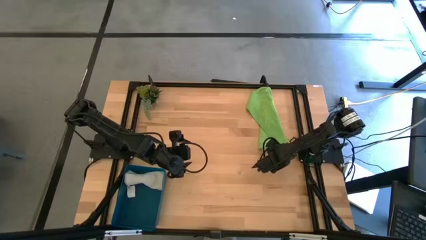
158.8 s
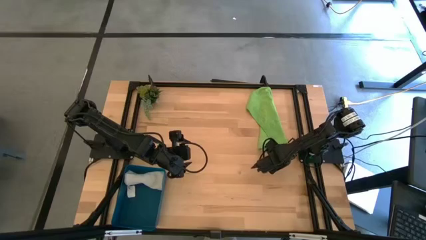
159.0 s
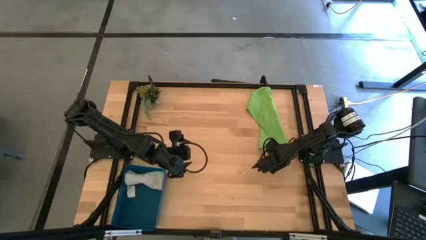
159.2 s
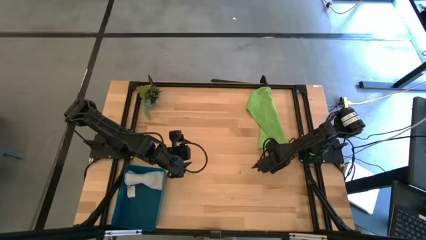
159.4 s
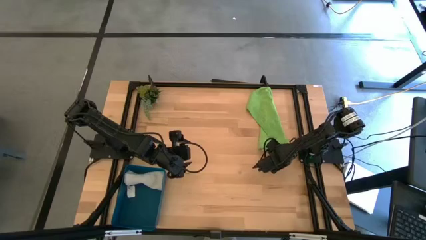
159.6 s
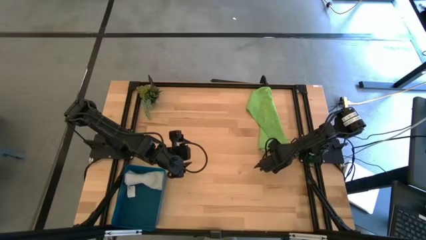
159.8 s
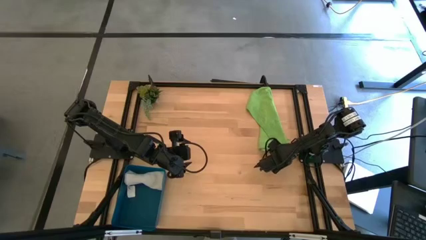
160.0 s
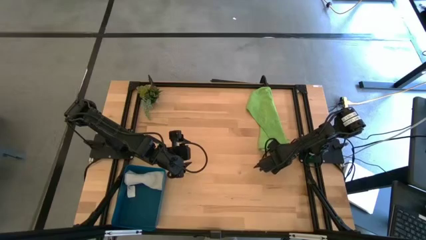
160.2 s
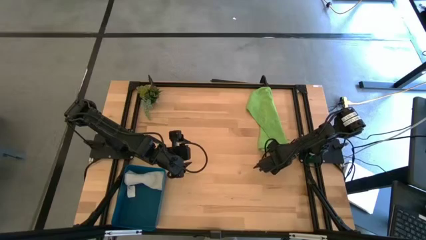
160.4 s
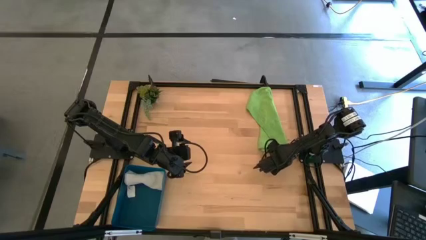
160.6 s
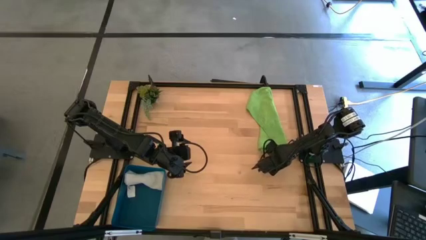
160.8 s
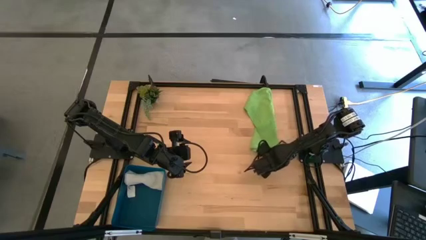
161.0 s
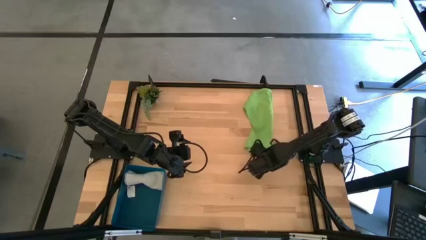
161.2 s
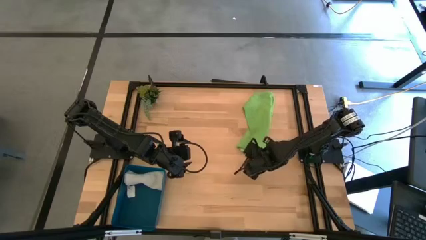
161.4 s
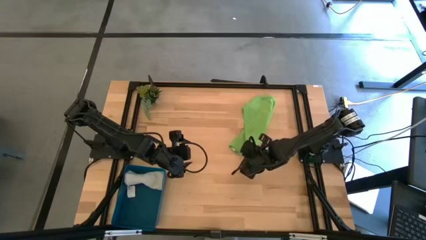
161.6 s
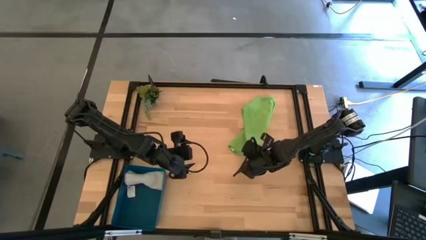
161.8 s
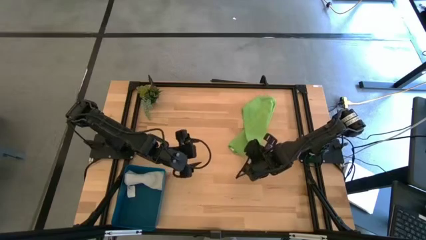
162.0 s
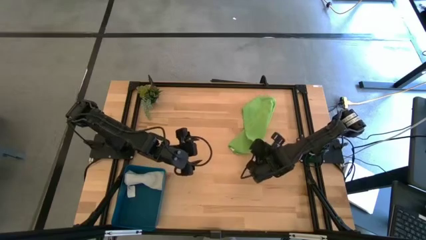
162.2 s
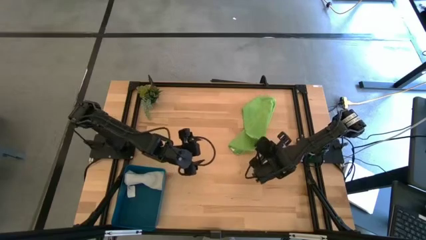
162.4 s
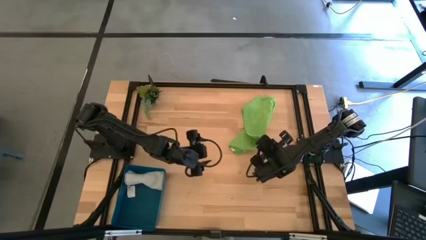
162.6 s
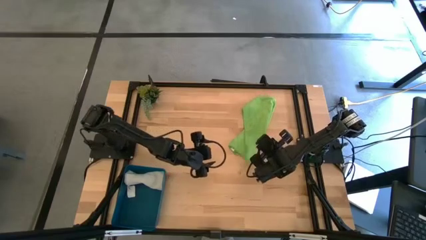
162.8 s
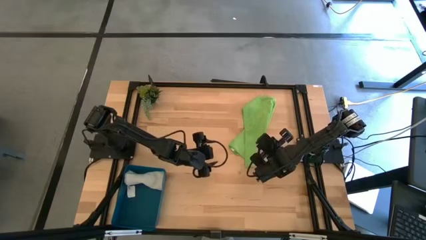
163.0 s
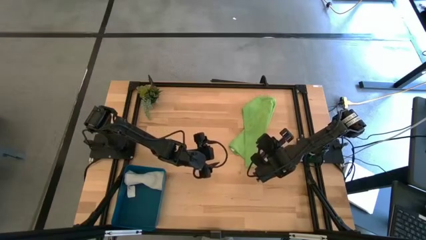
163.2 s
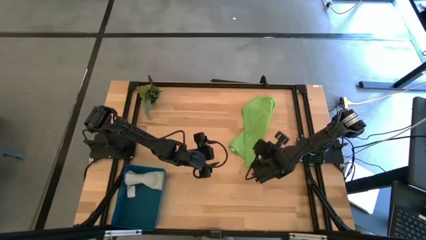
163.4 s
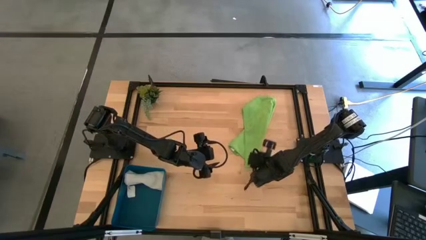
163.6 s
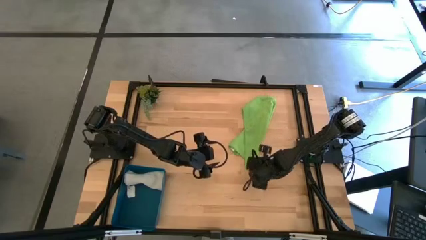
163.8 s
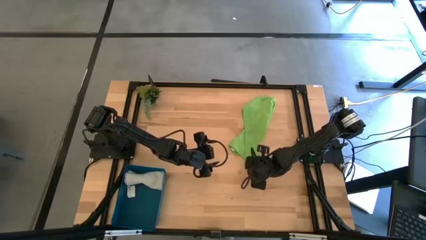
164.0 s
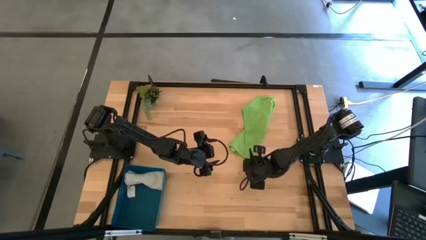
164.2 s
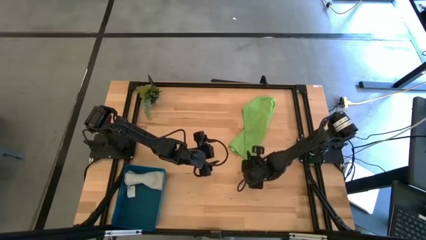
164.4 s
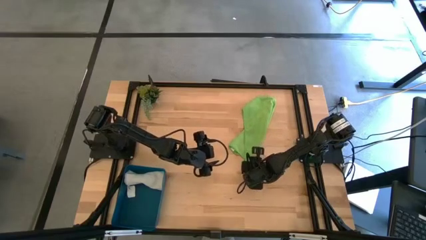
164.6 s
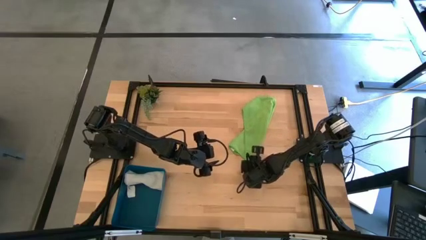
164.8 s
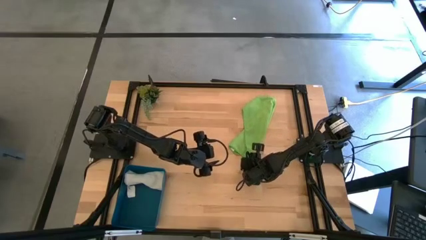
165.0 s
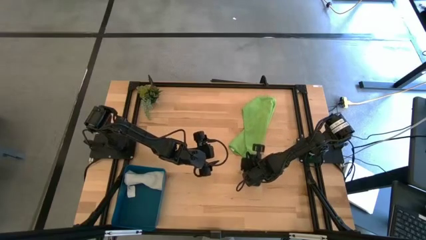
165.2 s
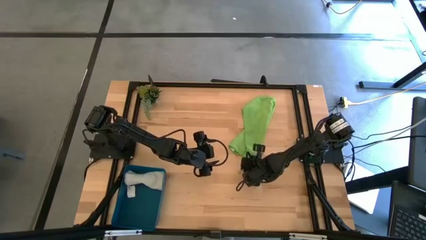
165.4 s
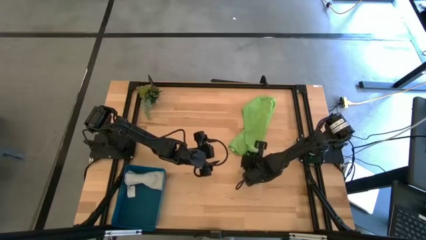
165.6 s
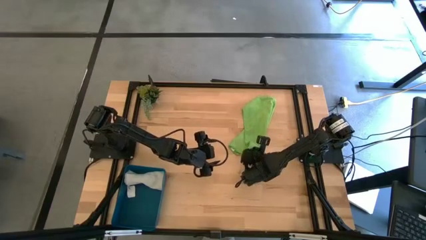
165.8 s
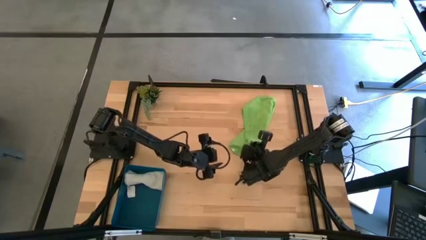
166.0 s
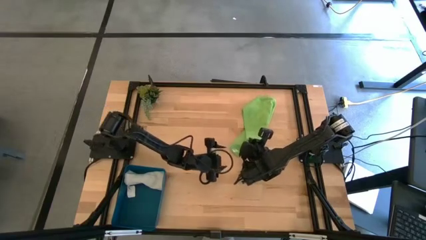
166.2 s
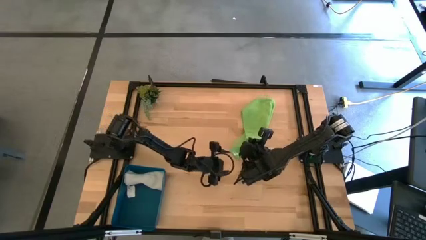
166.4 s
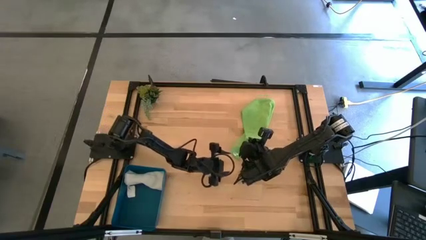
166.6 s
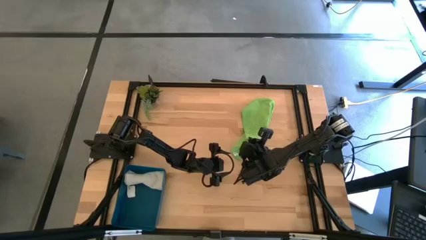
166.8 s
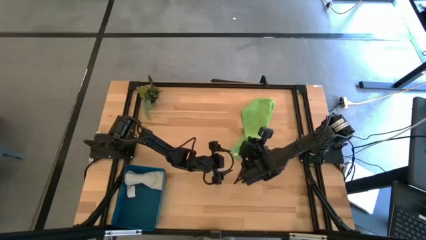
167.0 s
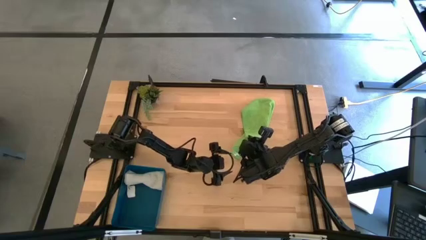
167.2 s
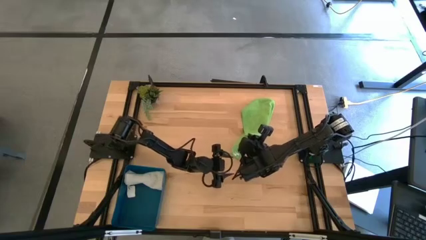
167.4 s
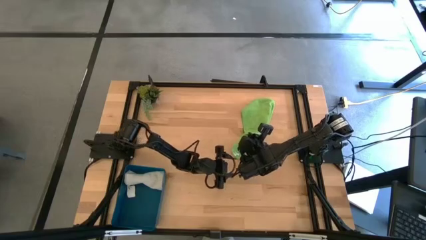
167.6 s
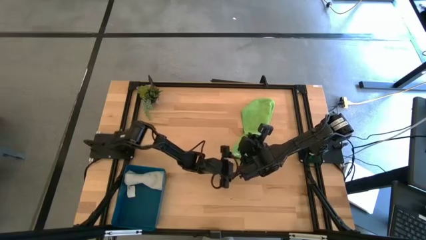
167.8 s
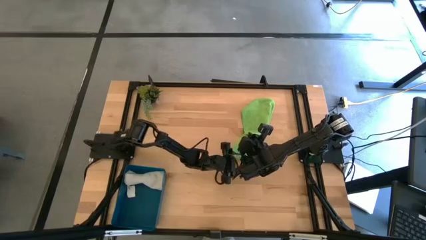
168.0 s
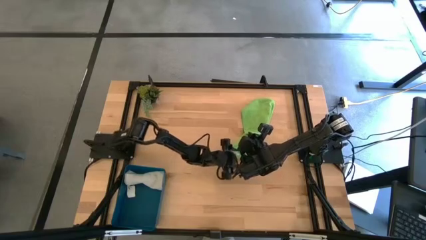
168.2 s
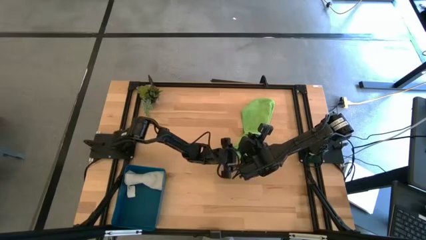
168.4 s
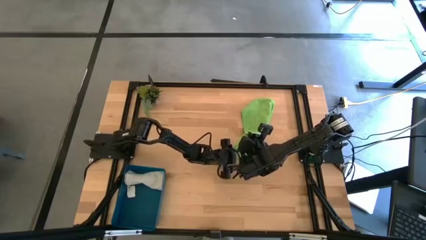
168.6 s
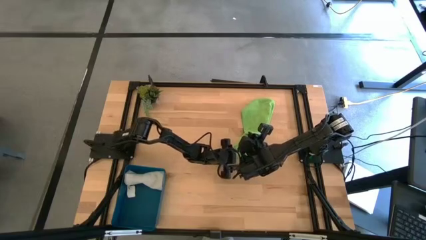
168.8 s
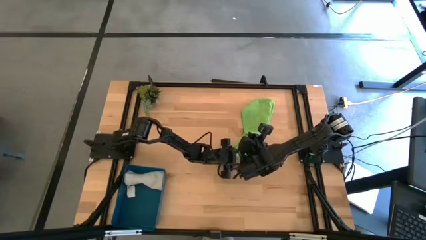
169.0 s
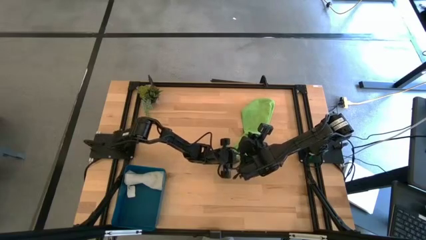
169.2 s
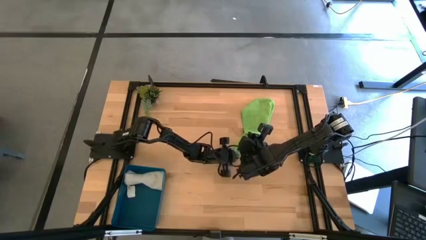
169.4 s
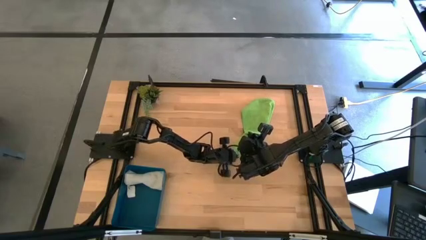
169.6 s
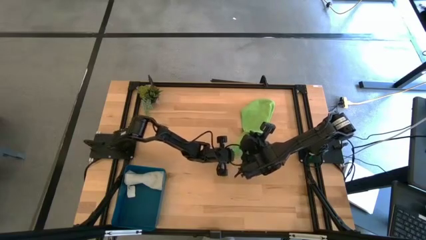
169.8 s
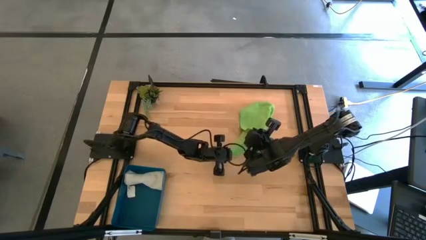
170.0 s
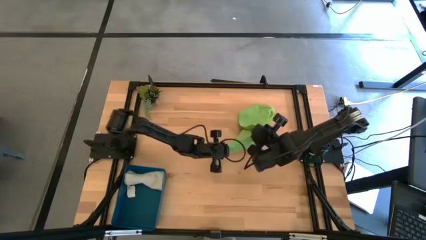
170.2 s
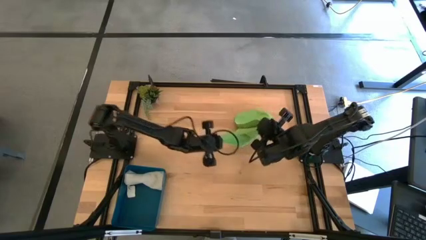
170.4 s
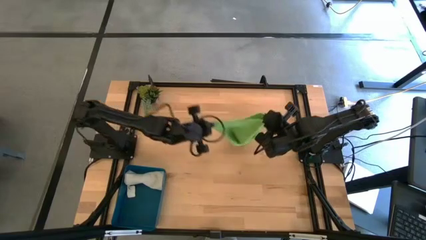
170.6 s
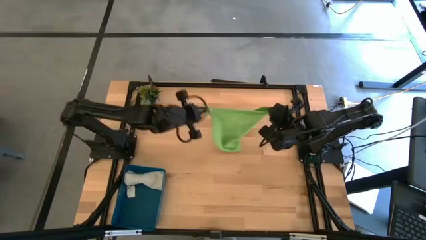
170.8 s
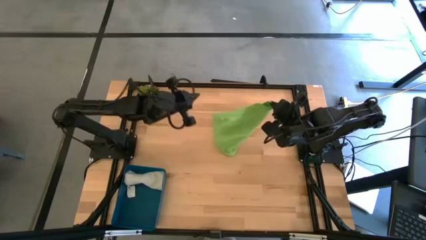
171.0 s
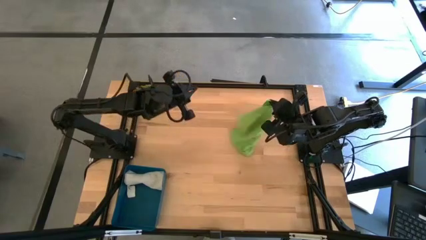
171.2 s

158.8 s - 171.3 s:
Task: Roll microfiber towels into tight, uniform cylinder then place into a basket
Roll the green towel

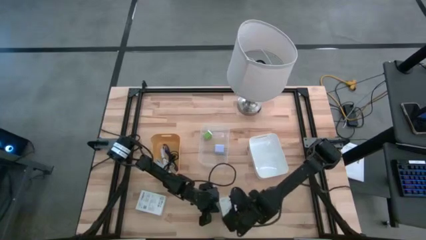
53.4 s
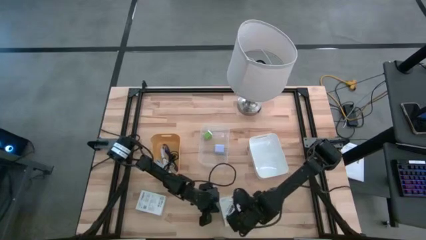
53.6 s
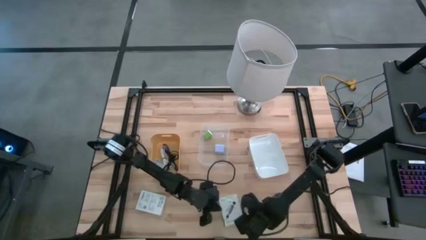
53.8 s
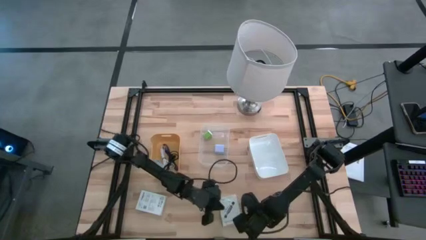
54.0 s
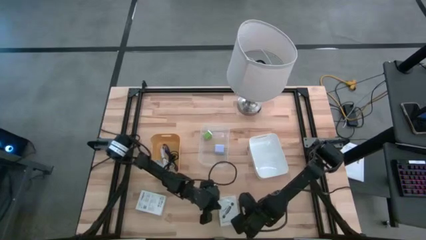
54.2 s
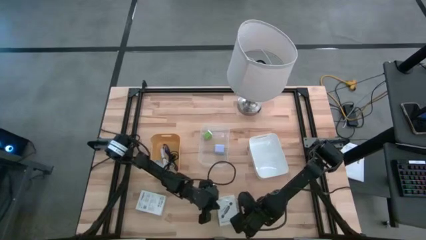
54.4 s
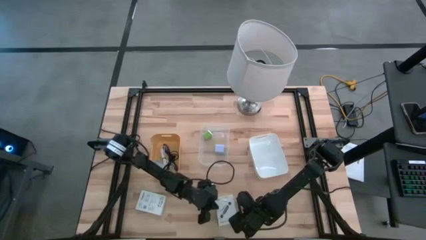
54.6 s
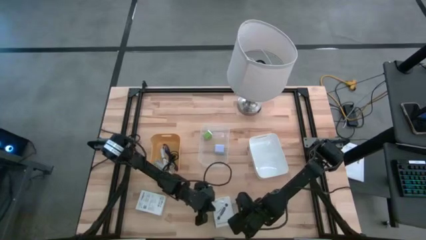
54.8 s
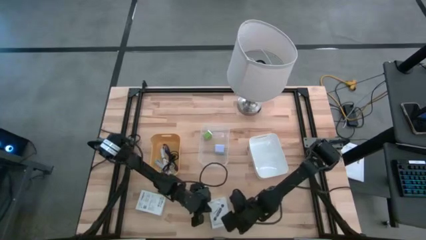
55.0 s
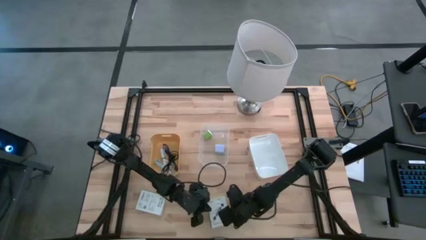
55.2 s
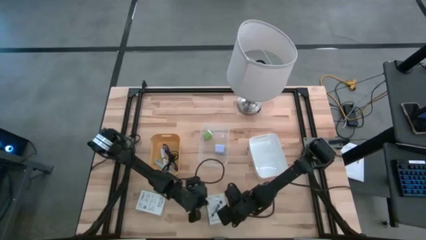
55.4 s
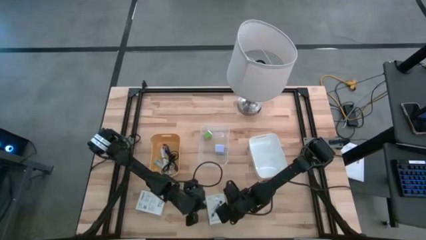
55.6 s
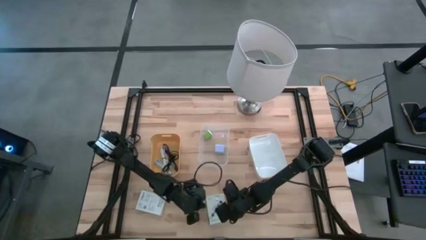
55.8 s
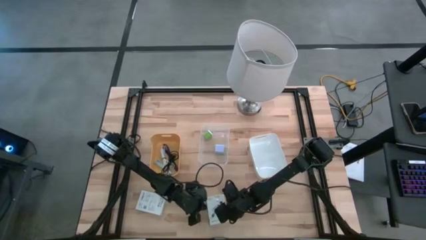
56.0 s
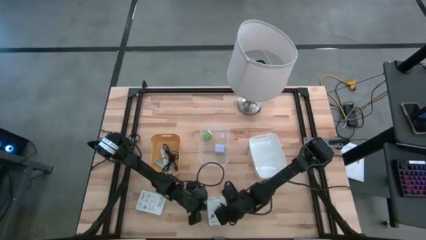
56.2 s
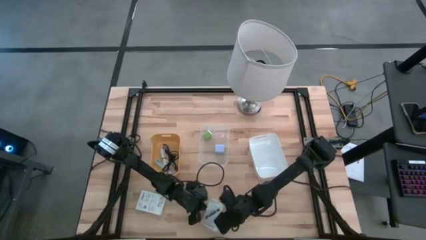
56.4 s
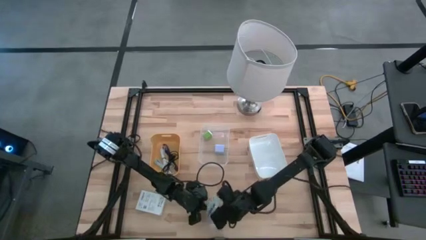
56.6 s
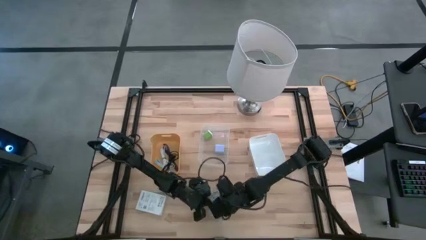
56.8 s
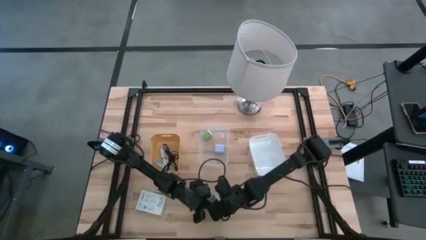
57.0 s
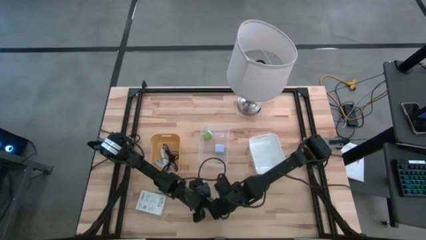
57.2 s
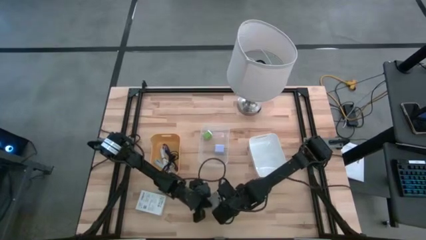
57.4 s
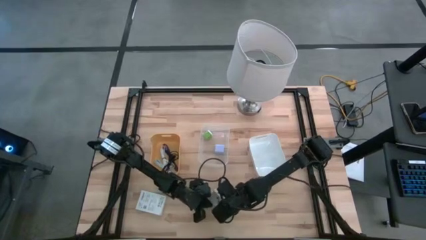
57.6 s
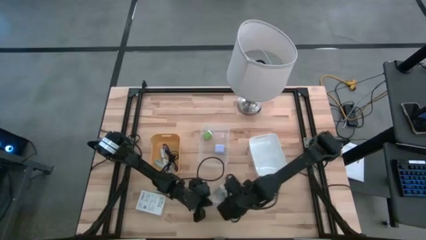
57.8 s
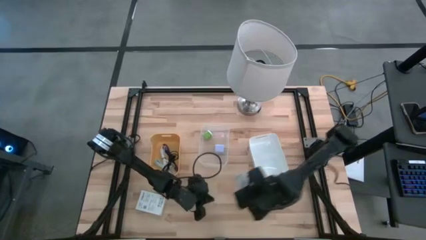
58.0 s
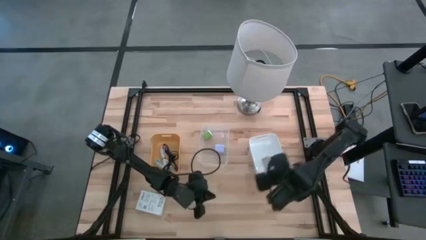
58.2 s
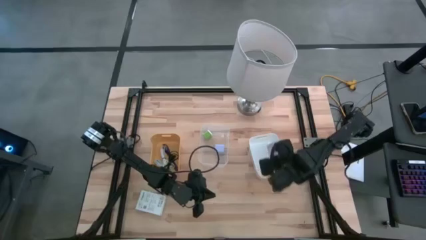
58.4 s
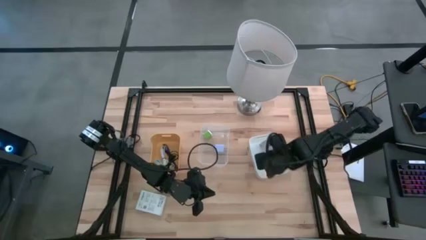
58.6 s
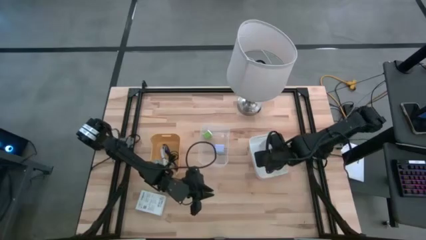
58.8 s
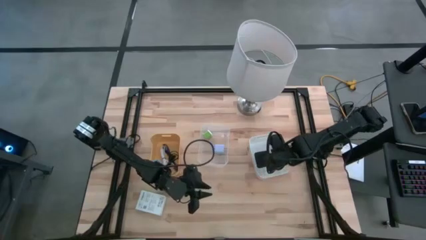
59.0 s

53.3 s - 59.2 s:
Task: Pick and place items into bin
Put the white card reader box into the white bin
